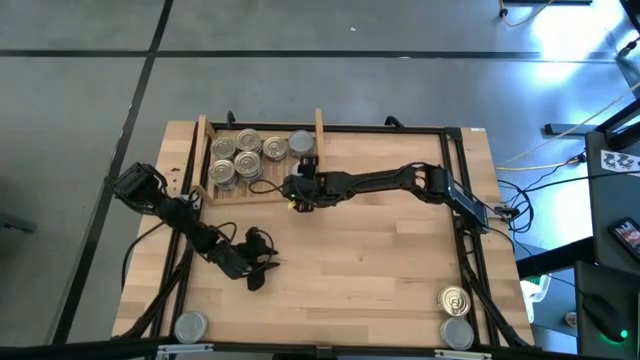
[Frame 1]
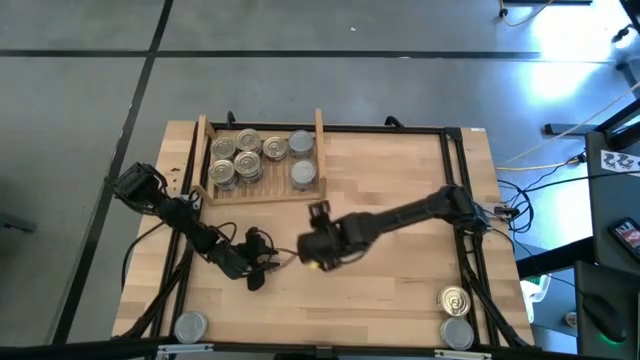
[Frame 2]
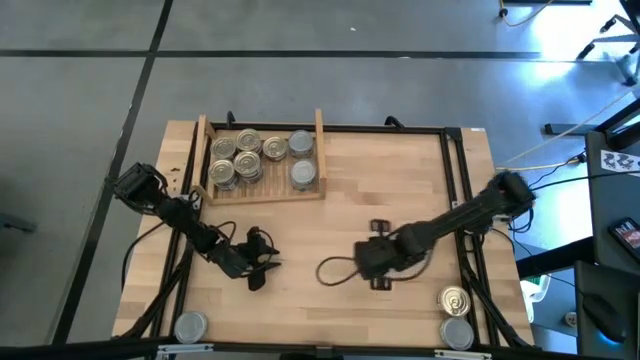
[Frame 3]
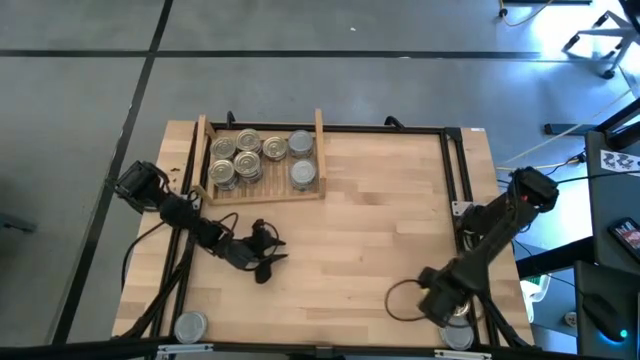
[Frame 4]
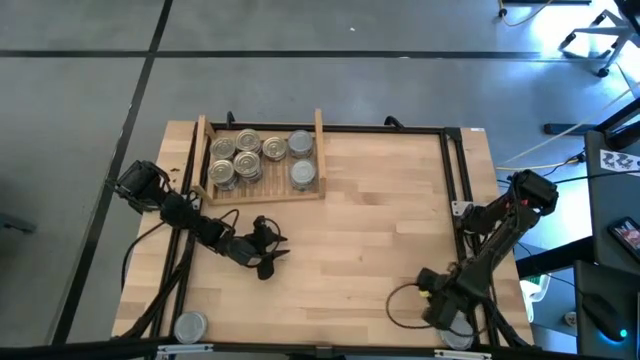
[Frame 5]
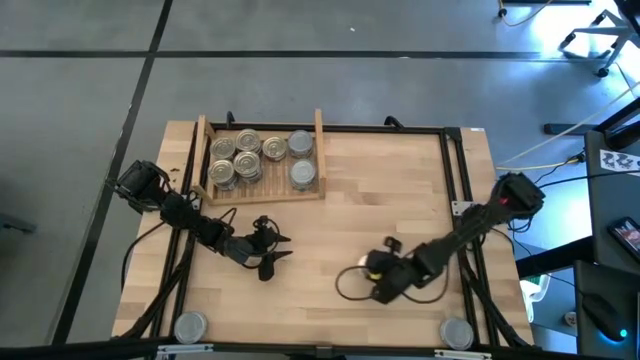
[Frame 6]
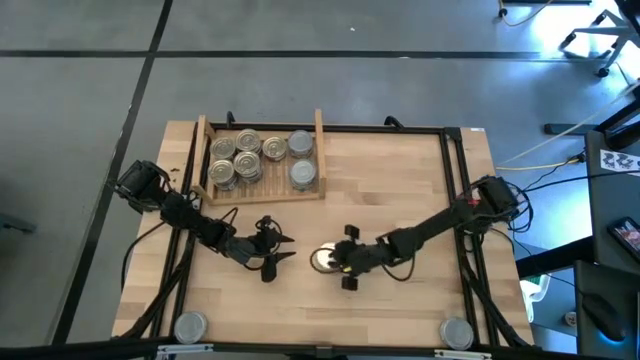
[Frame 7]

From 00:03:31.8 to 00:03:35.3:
Task: Stack canned seafood by type on shelf
Move the blue tuna can from the bottom right to the center

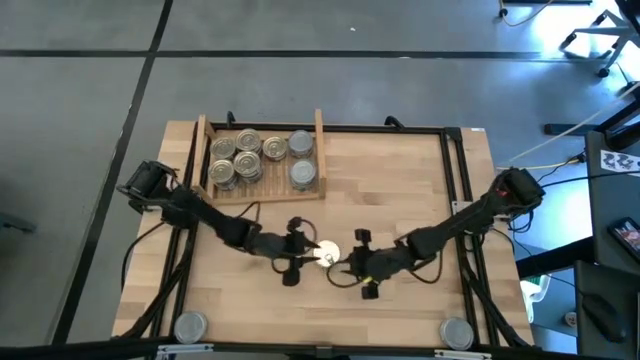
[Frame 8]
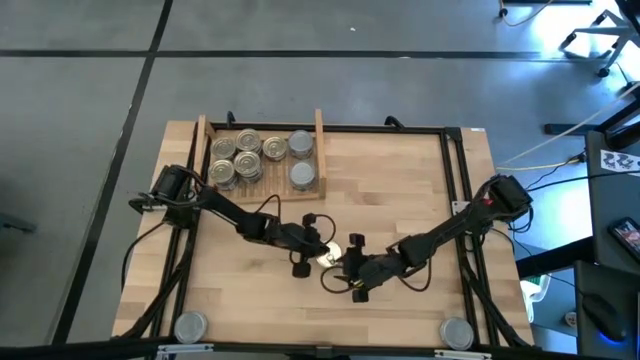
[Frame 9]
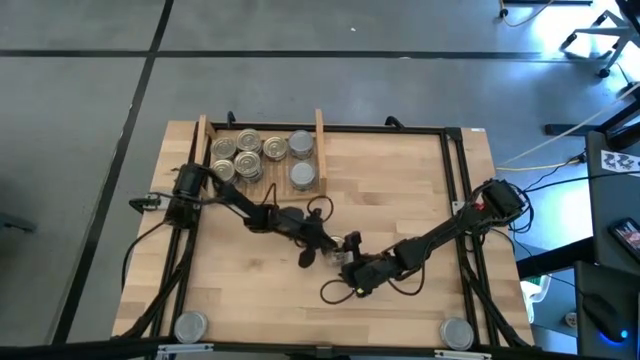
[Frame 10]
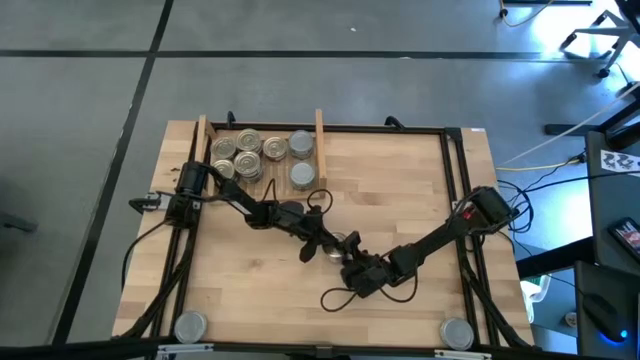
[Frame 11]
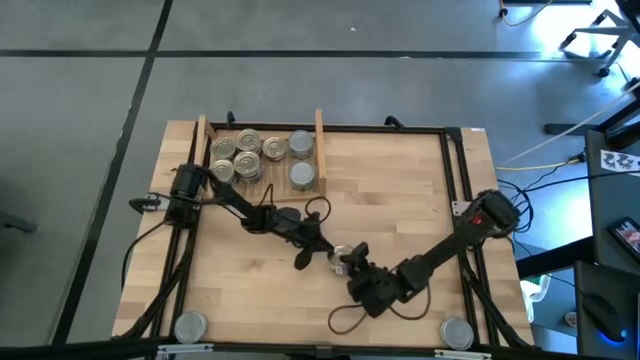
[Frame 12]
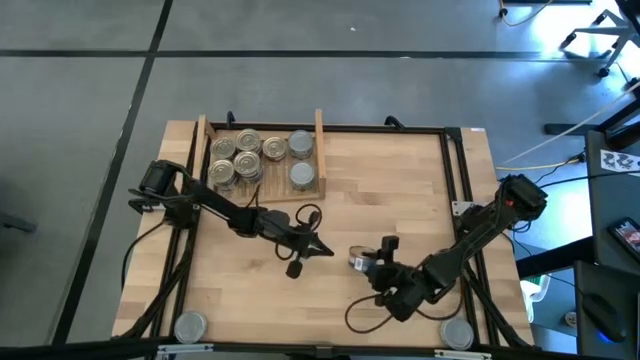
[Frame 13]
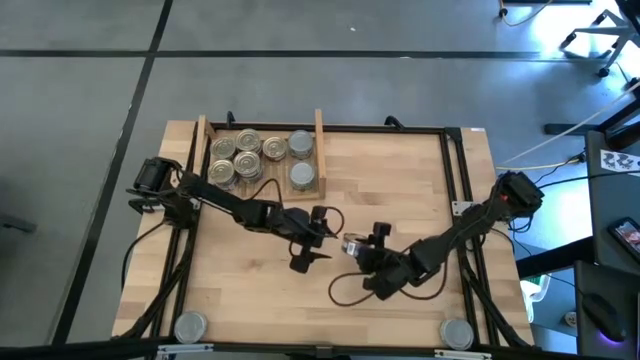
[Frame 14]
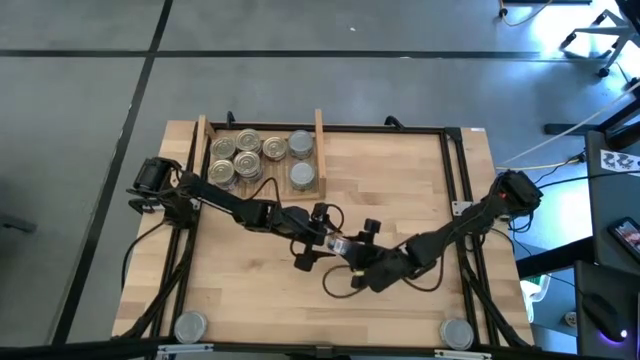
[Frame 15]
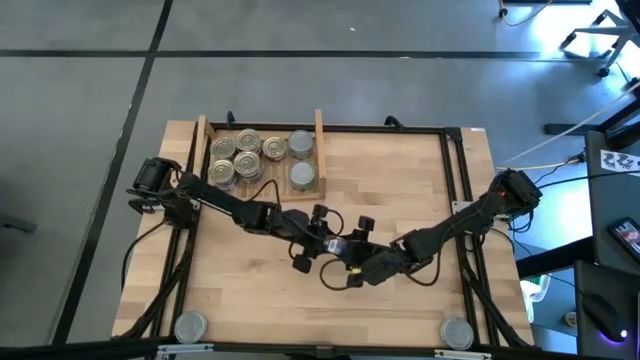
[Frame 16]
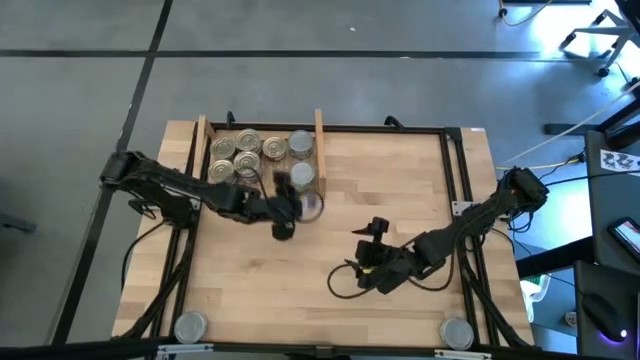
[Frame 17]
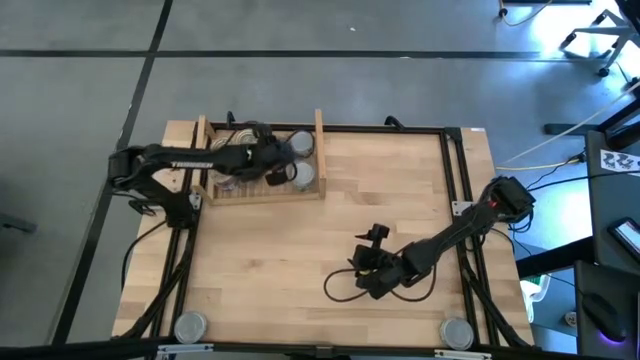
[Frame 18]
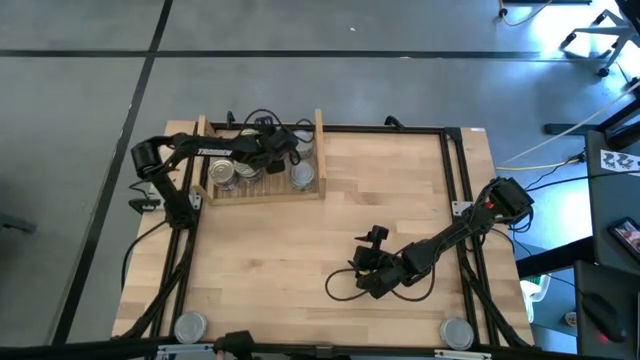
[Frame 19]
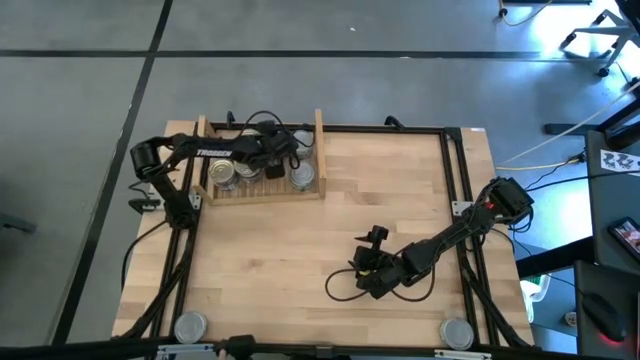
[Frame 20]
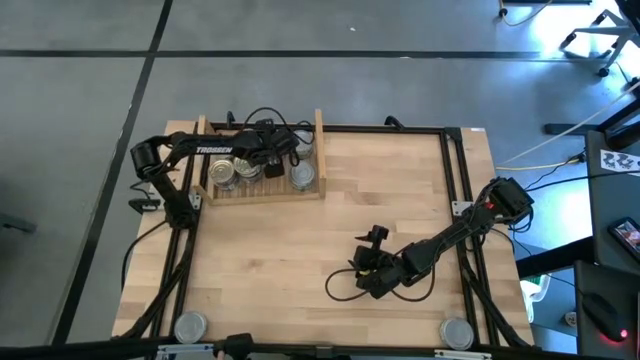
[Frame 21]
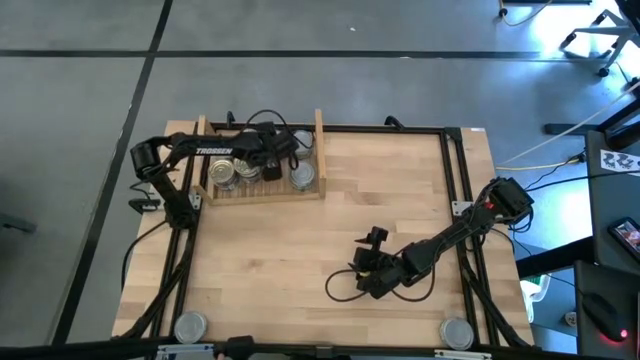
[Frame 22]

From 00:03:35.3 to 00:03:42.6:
Stack the blue tuna can on top of the other blue tuna can on the shelf

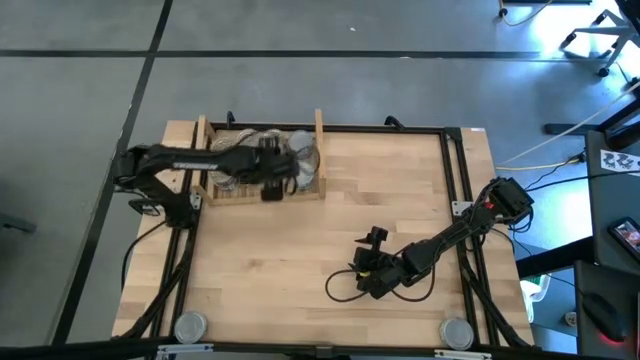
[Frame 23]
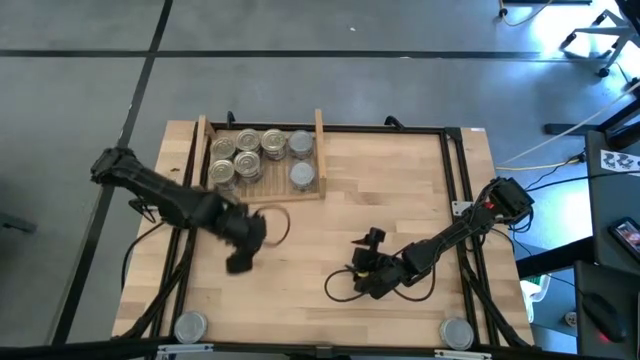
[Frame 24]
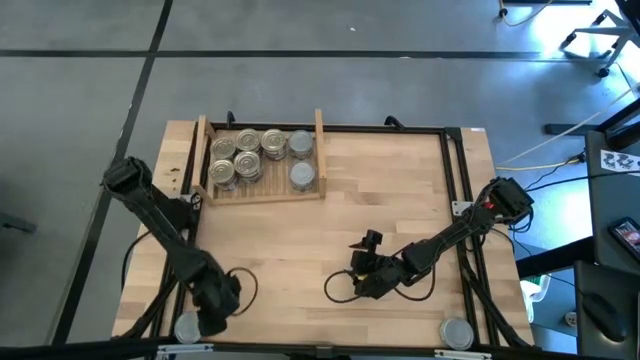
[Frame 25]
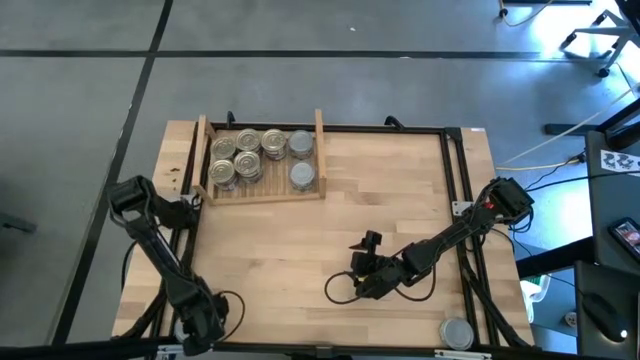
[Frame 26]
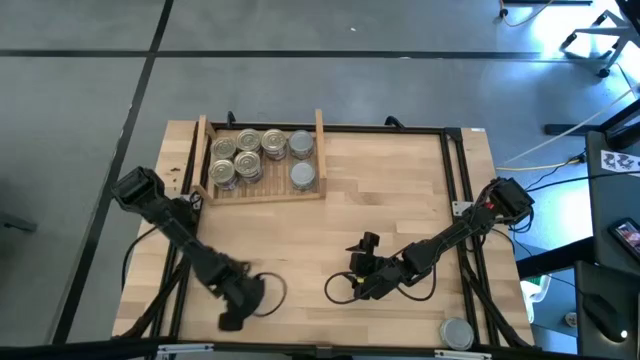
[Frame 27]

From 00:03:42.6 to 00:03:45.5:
Move the green tuna can from the bottom left to the center

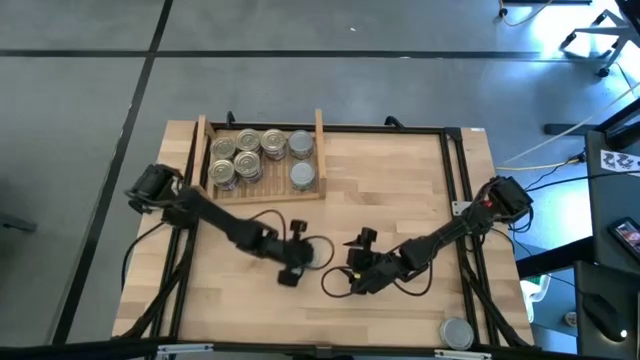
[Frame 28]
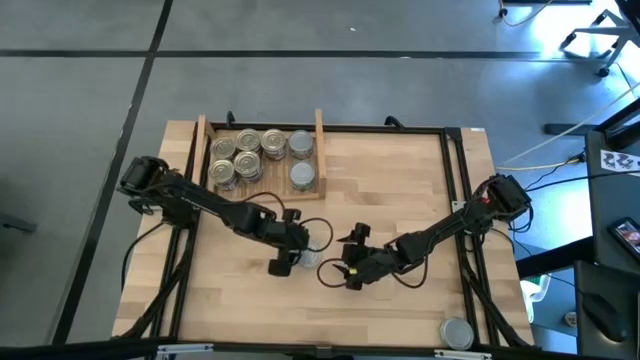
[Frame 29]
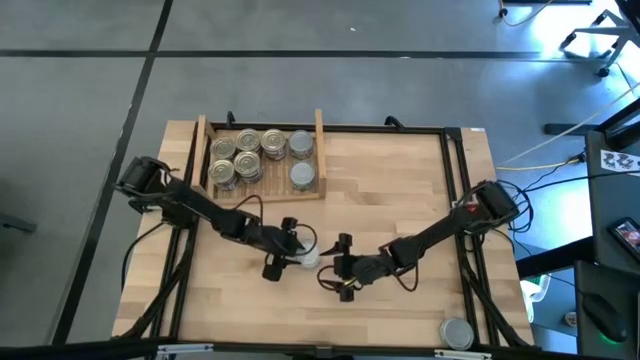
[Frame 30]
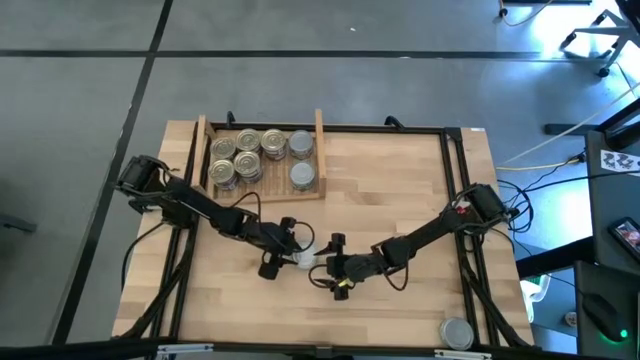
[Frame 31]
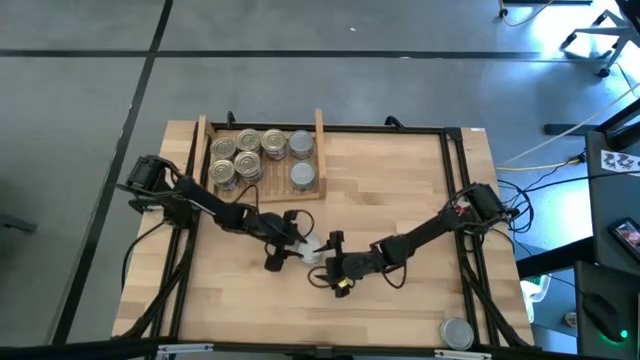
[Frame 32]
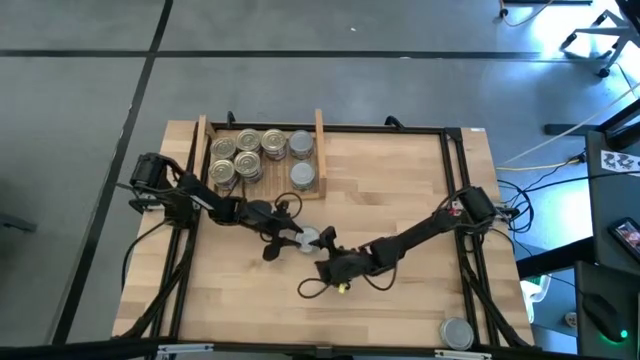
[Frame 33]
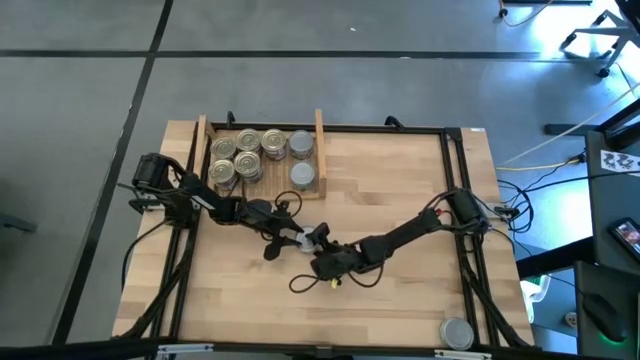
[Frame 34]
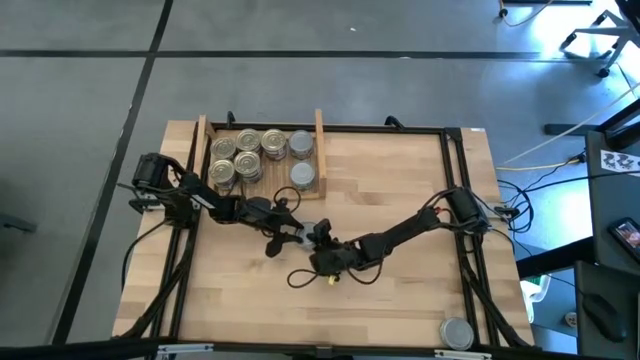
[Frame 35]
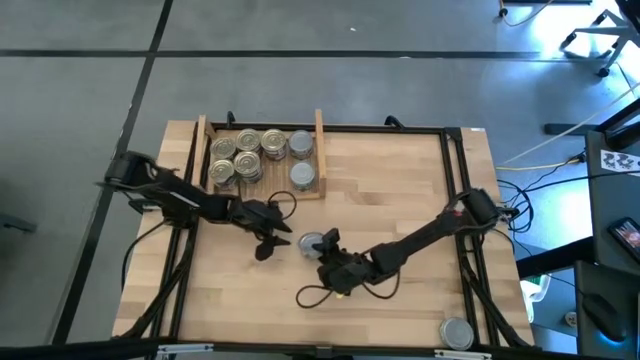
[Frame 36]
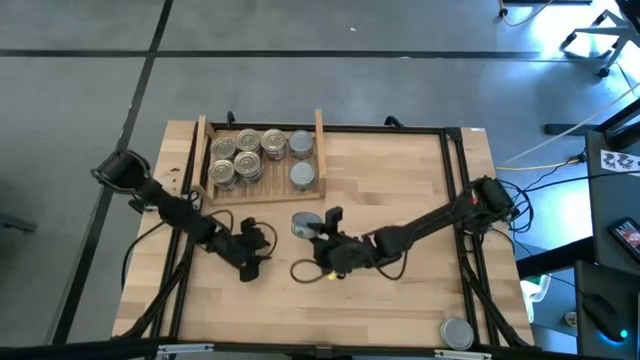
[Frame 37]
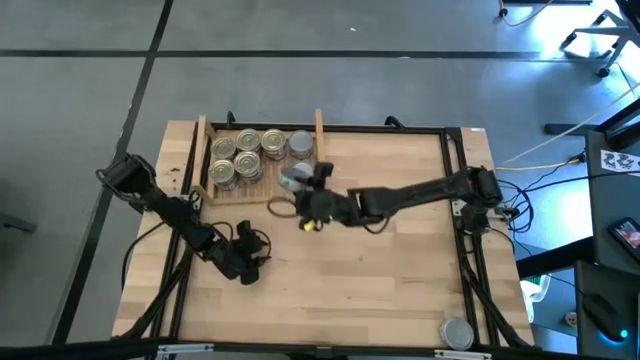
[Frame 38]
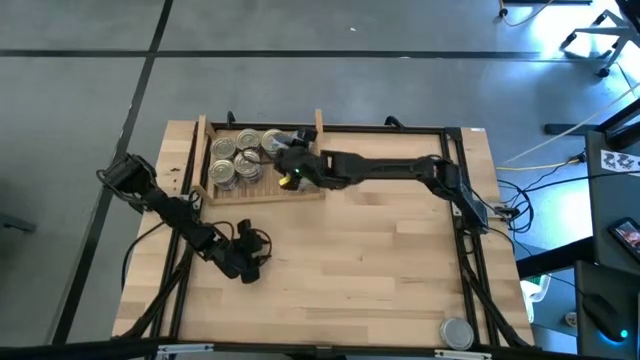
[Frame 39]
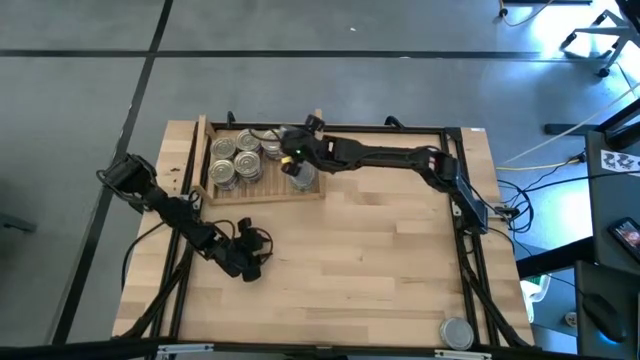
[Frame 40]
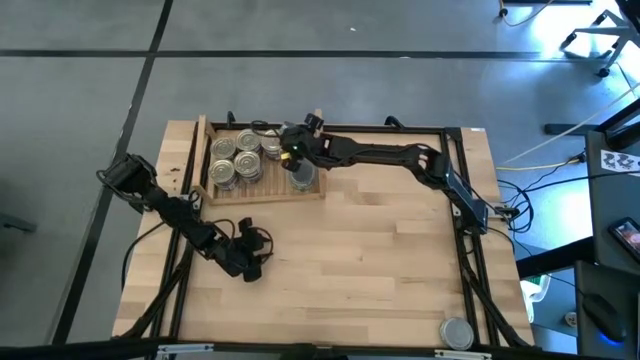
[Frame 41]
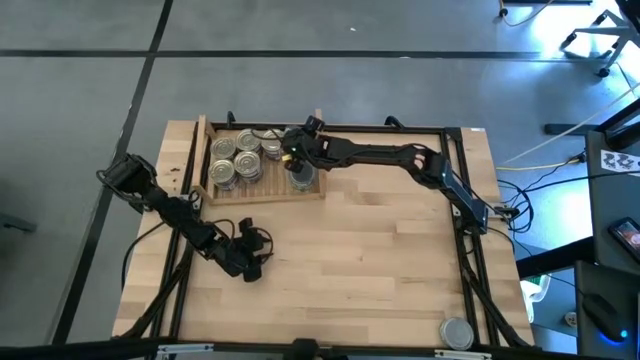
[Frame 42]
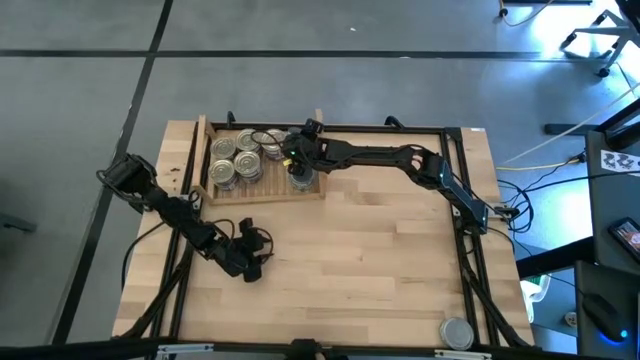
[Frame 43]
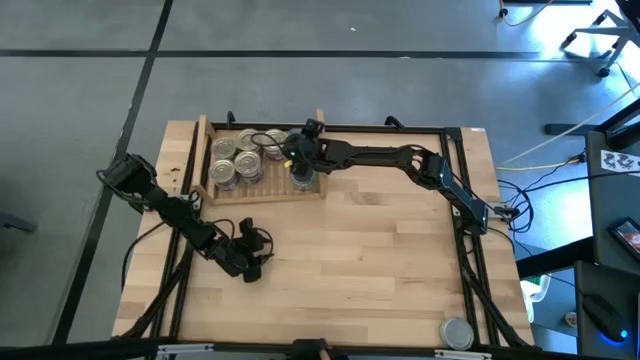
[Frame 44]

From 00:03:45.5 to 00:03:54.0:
Stack the green tuna can on top of the other green tuna can on the shelf
